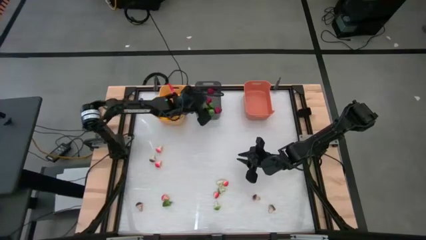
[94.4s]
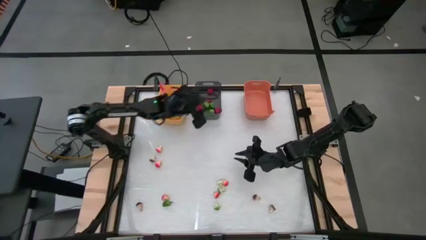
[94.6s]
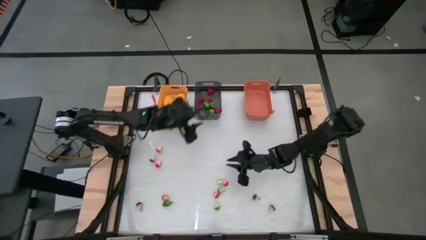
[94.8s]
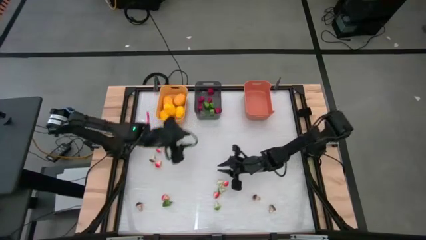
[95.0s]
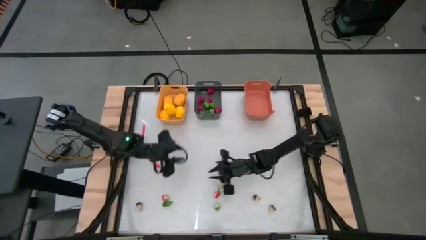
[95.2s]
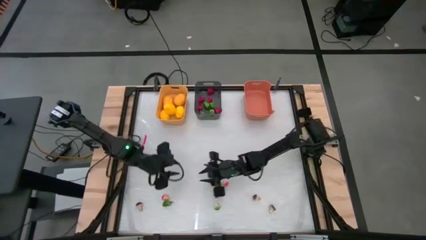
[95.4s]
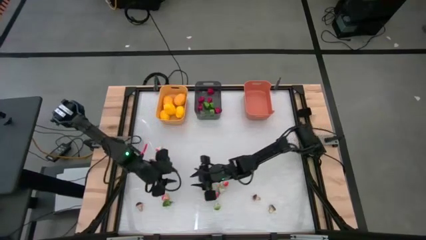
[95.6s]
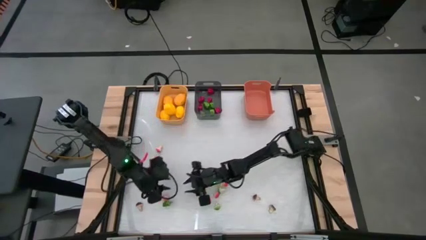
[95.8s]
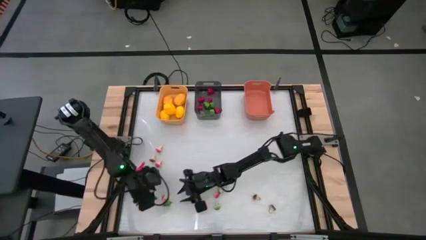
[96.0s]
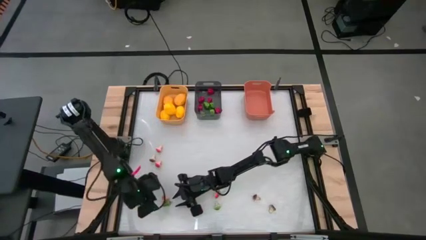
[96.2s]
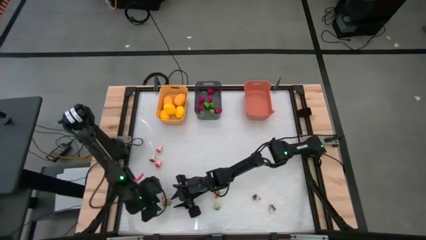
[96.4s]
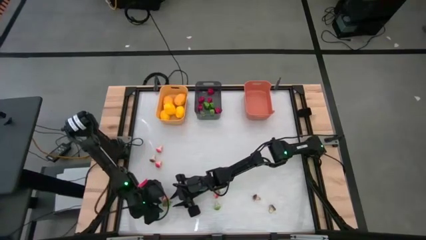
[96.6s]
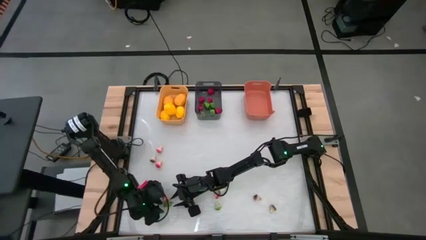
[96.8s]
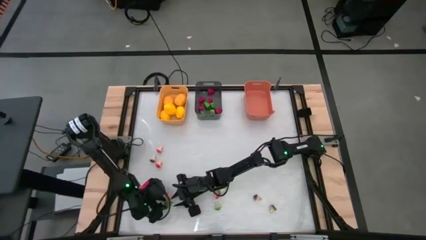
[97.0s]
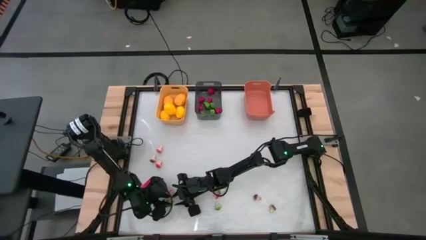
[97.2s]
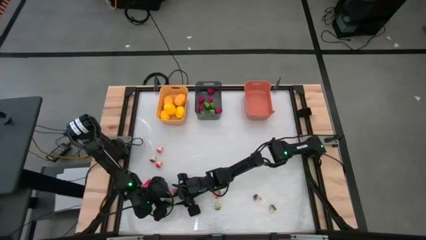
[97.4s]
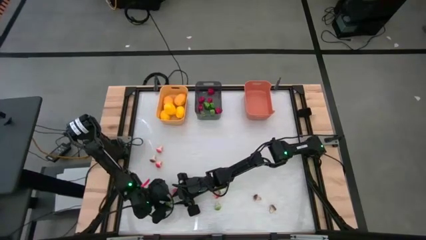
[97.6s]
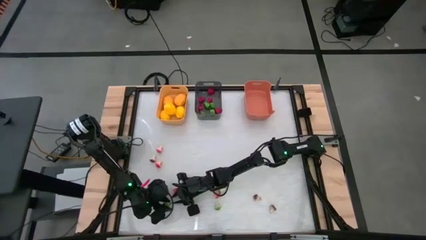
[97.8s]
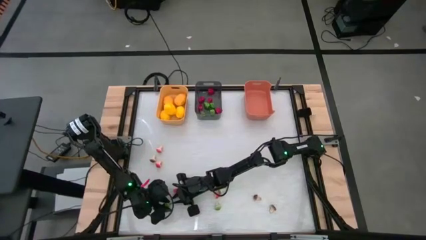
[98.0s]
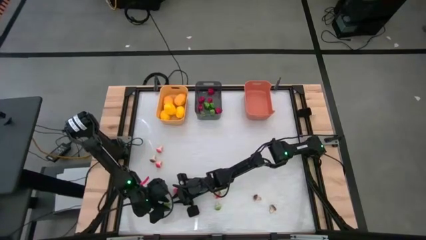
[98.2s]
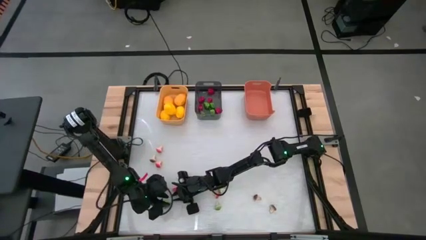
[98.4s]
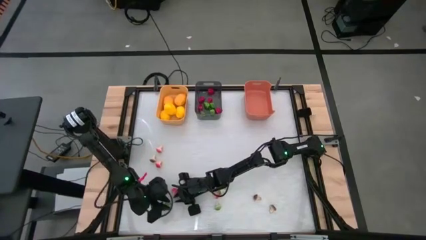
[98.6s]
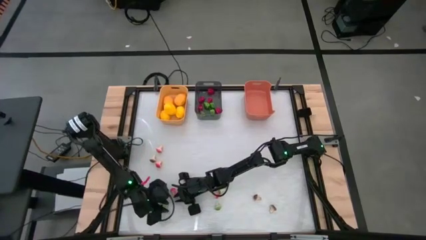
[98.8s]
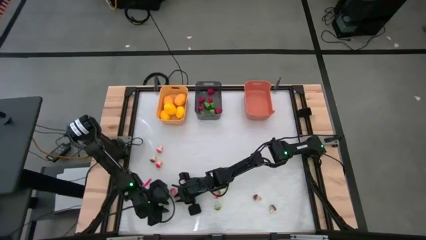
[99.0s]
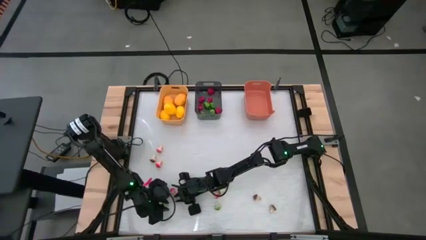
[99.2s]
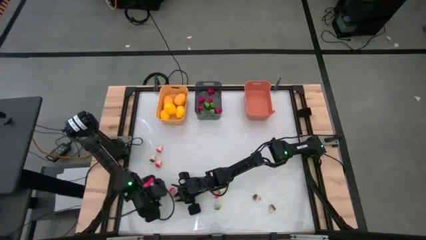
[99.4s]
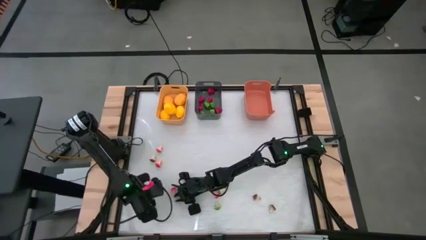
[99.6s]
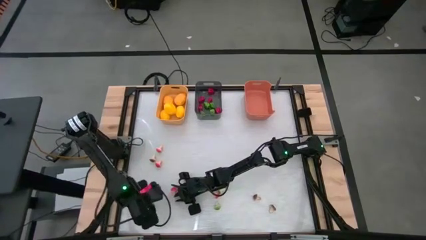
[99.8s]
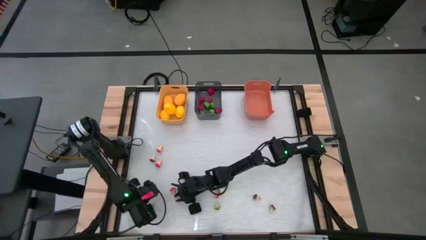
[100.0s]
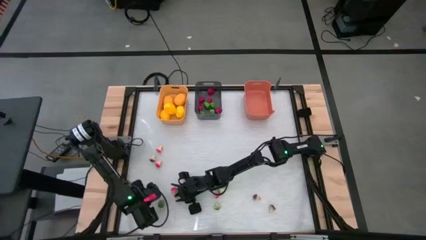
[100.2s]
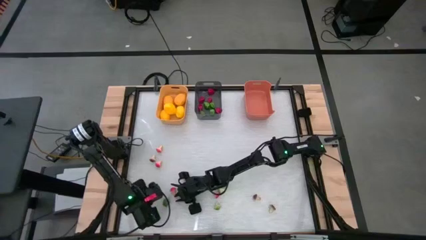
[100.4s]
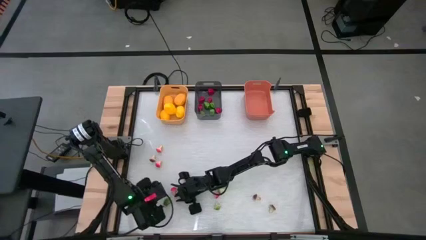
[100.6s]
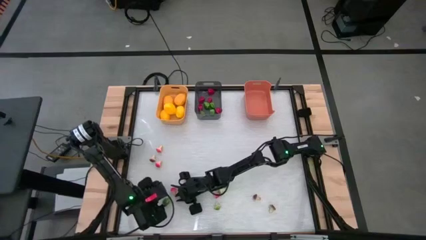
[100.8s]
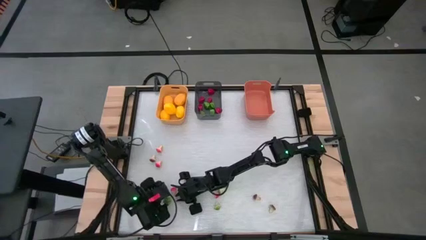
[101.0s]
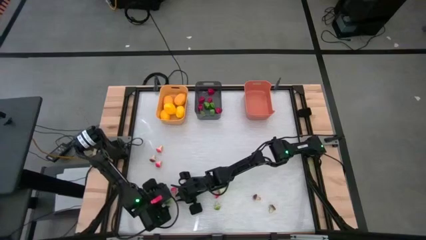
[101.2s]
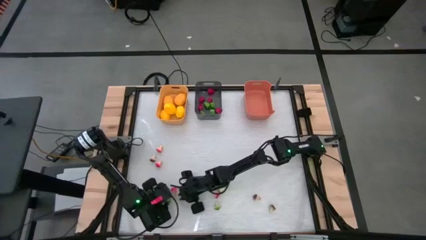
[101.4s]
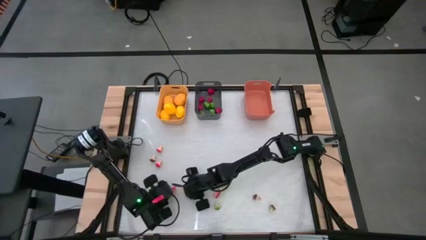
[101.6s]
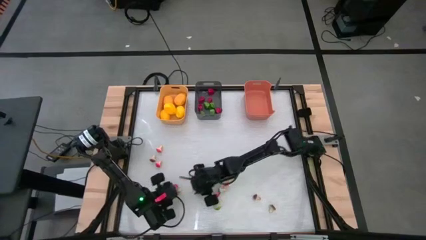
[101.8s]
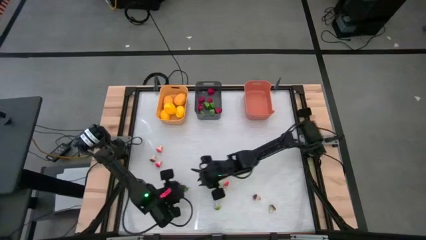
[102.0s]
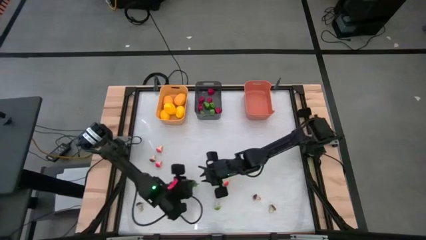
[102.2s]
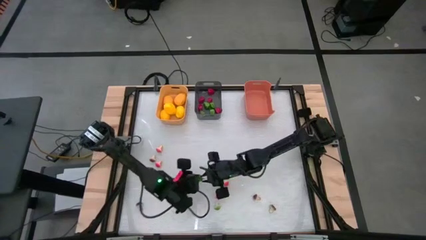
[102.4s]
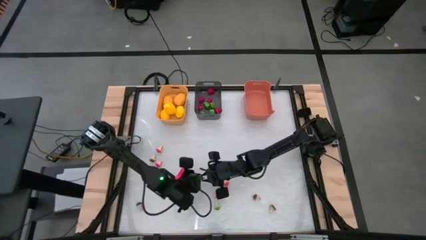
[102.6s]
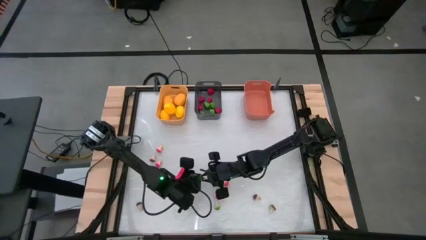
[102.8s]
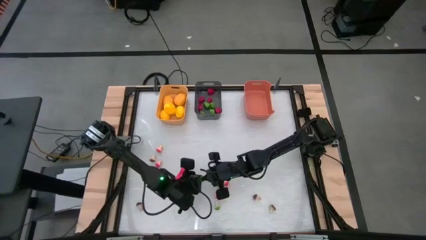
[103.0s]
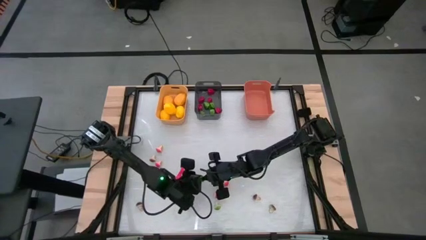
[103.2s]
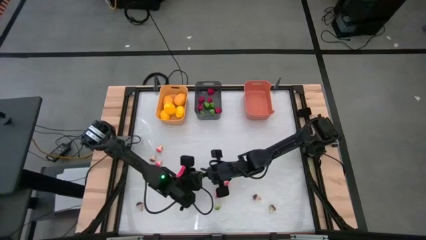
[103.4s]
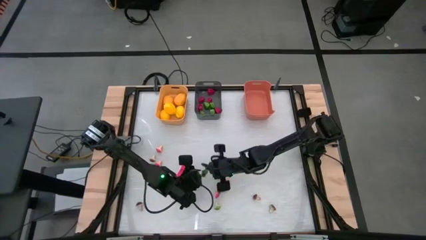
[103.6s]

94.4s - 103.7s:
Task: Sort produce into baskets
Put the green chili pepper into the black bin

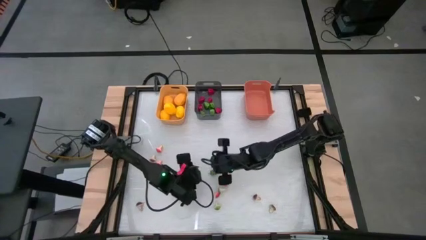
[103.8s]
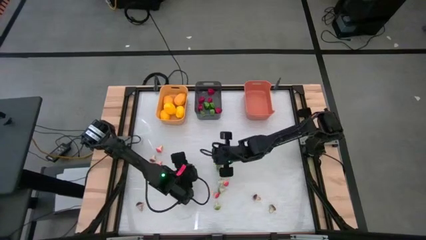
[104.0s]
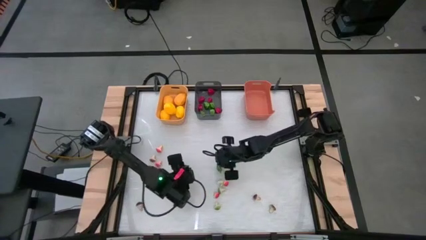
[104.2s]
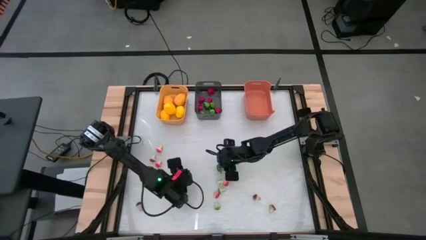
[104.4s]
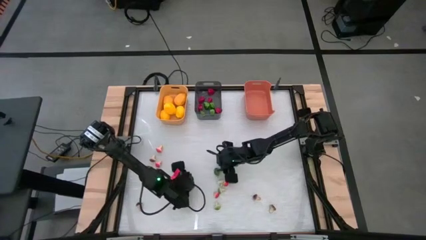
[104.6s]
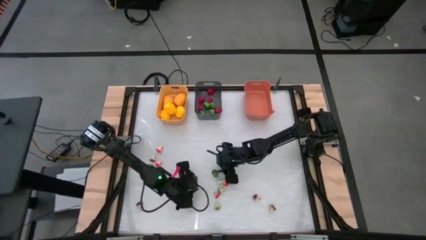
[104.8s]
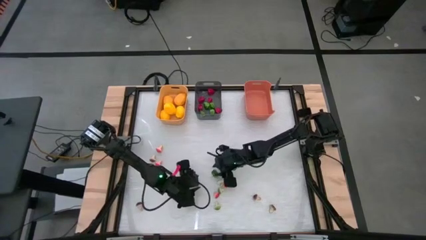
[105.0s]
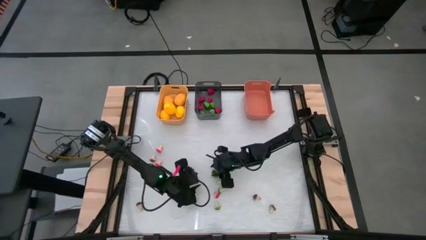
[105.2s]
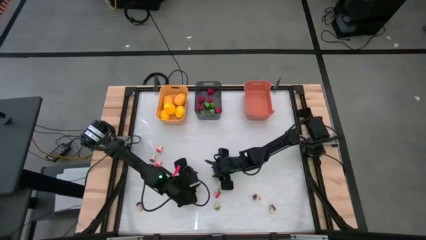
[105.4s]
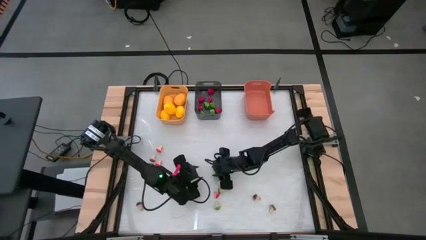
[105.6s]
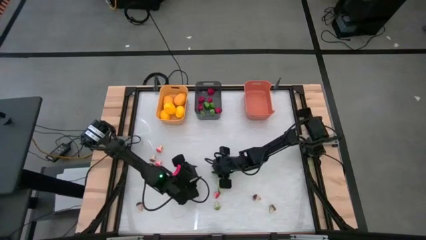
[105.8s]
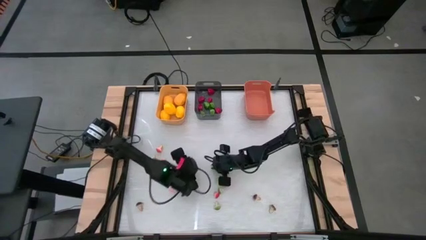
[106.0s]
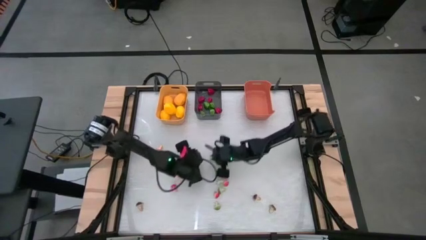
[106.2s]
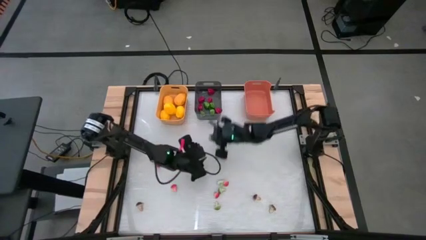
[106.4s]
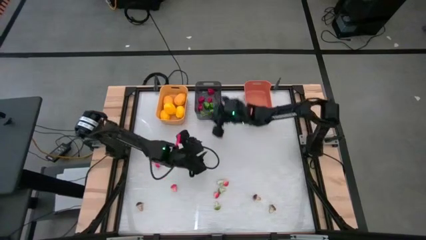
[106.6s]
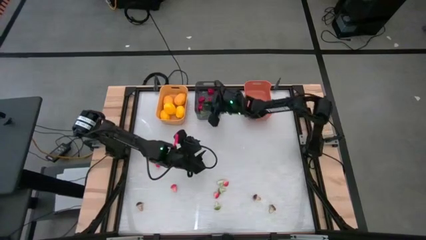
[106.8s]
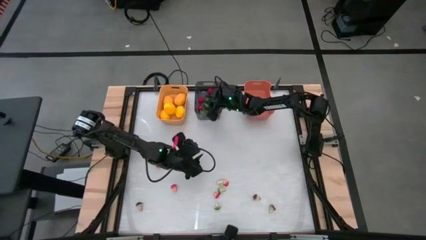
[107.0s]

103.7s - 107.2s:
Put the green chili pepper into the black bin

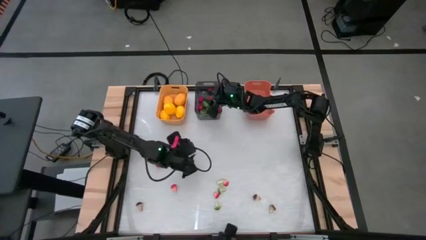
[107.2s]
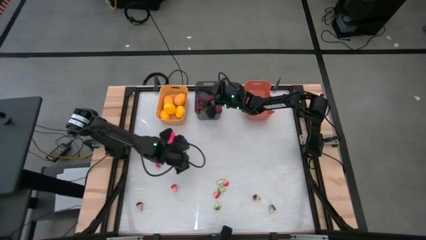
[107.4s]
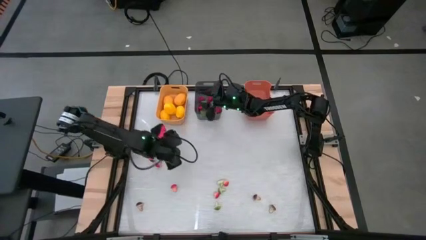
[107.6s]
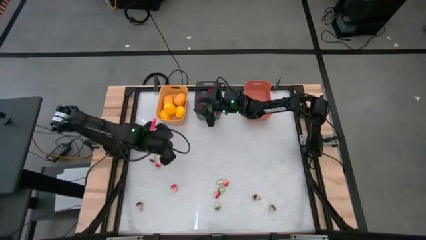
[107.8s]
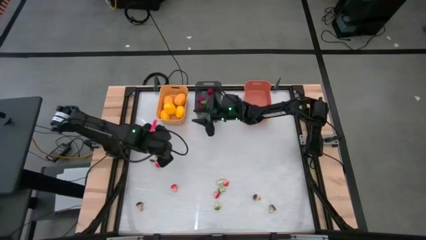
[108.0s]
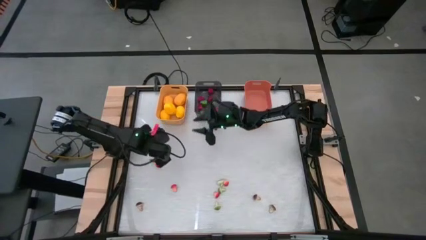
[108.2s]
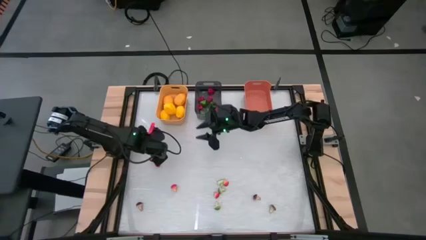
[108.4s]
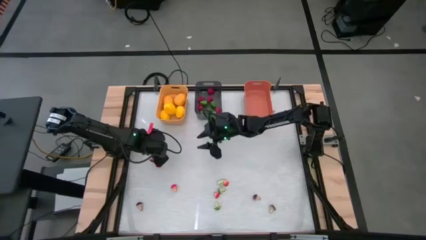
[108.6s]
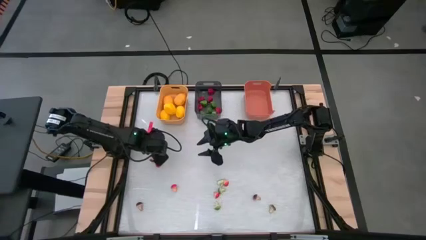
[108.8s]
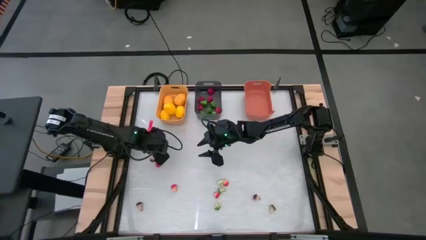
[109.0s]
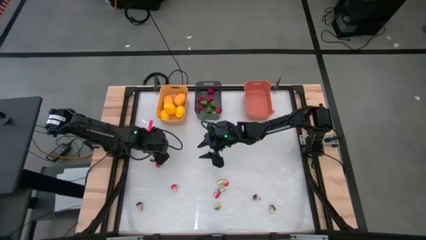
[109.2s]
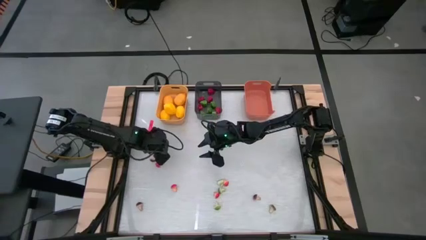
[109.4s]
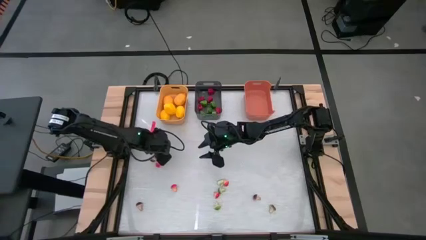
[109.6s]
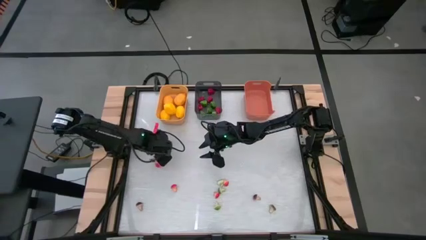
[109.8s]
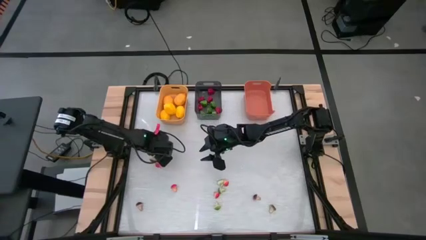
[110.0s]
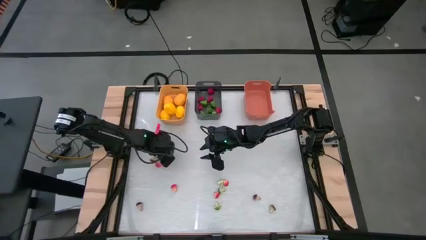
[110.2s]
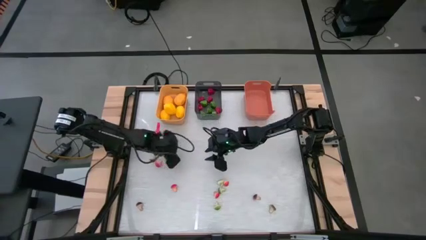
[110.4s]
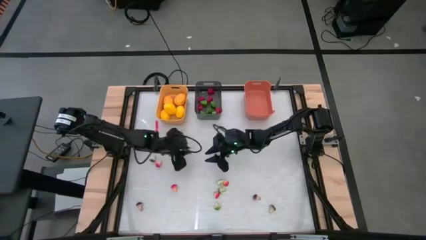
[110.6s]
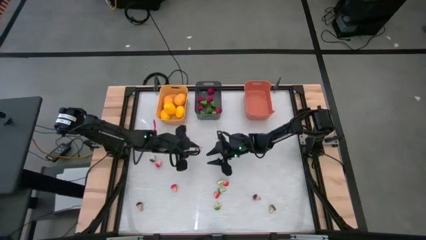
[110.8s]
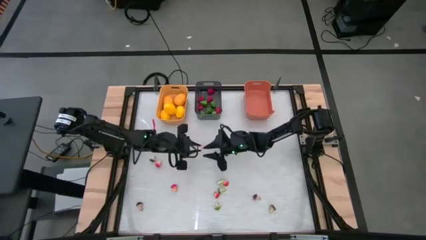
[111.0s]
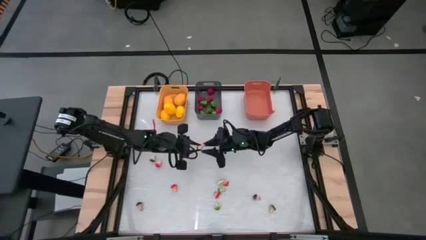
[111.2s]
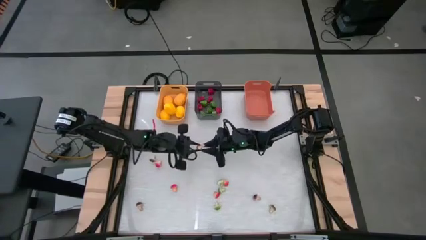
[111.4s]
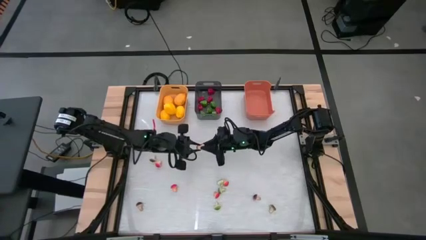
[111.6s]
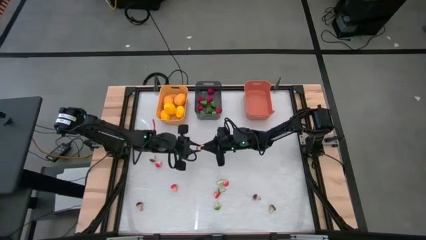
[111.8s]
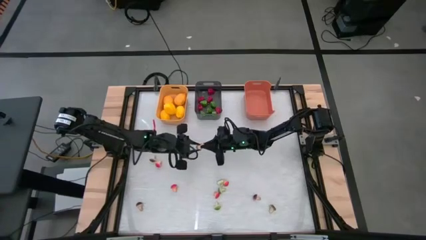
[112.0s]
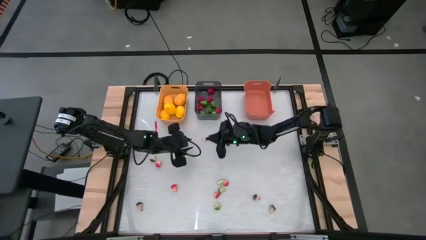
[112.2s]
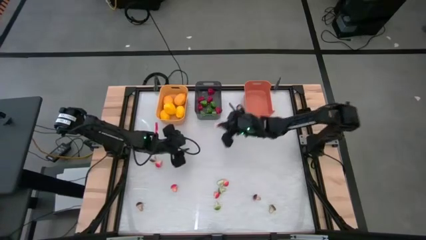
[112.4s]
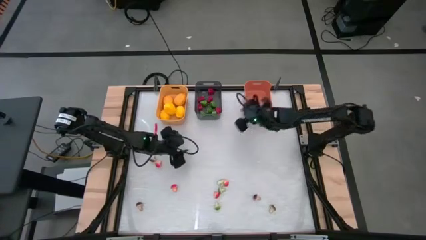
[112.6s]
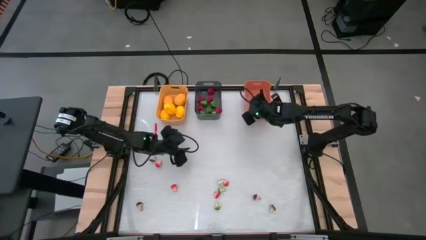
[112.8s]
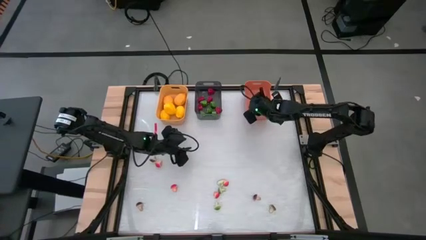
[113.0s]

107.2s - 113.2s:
Put the red mushroom into the orange bin
